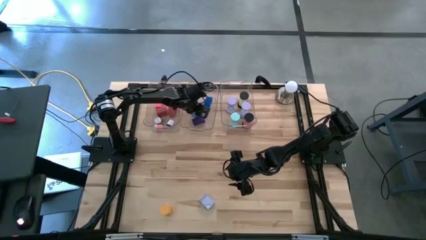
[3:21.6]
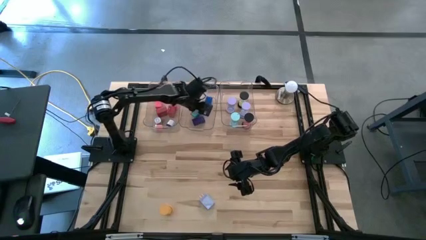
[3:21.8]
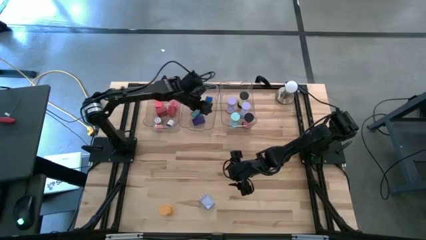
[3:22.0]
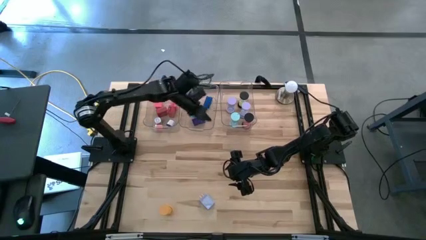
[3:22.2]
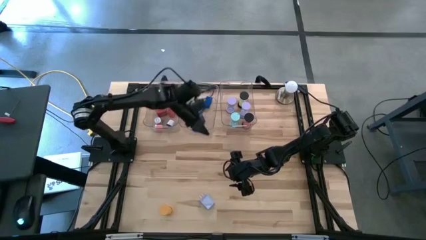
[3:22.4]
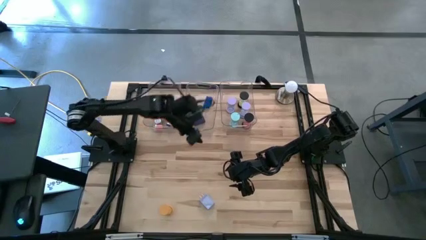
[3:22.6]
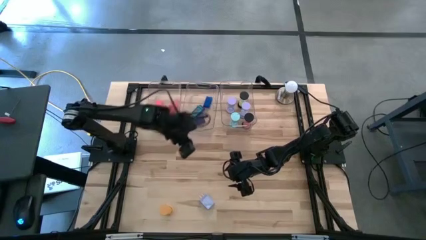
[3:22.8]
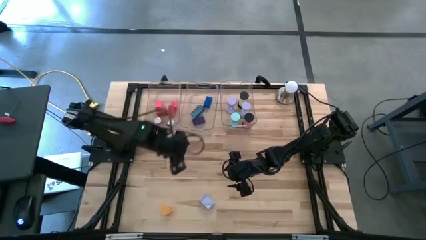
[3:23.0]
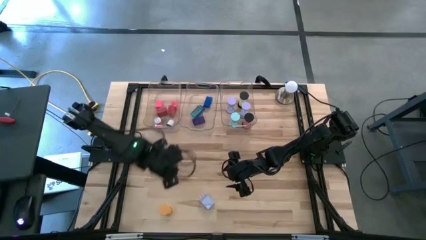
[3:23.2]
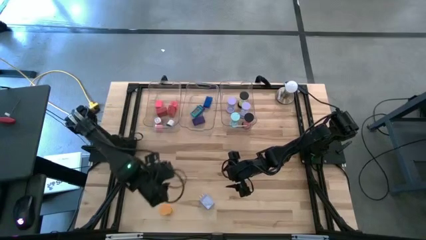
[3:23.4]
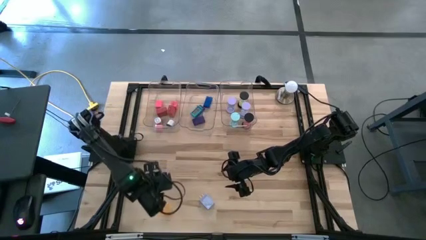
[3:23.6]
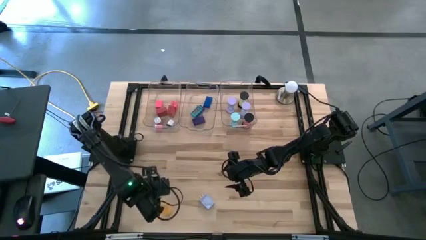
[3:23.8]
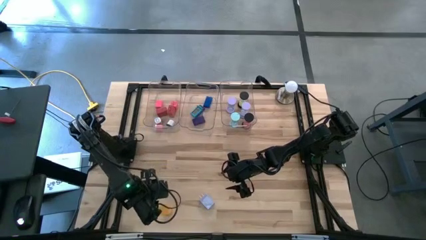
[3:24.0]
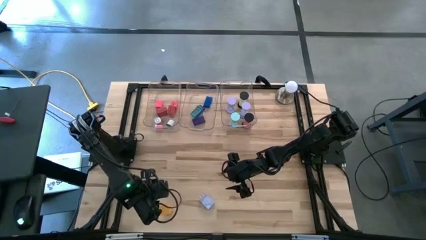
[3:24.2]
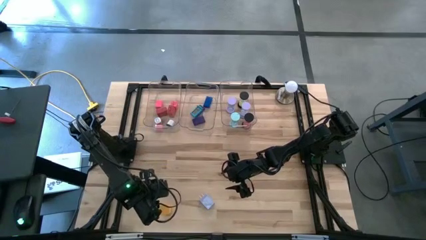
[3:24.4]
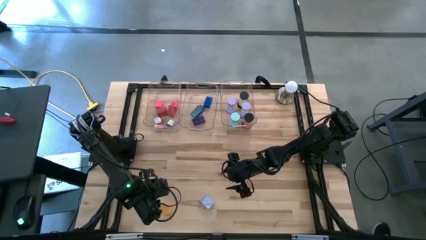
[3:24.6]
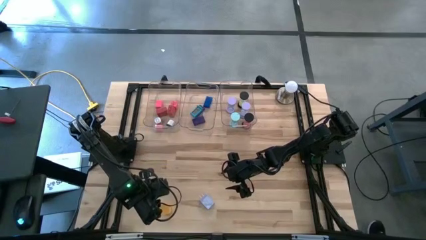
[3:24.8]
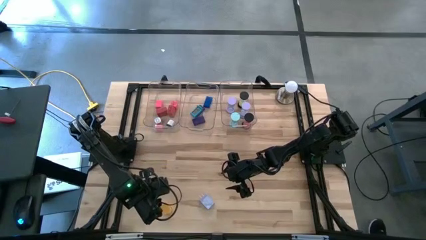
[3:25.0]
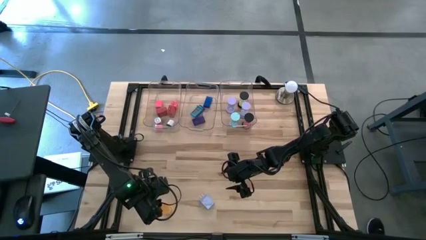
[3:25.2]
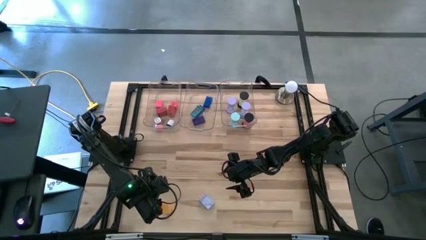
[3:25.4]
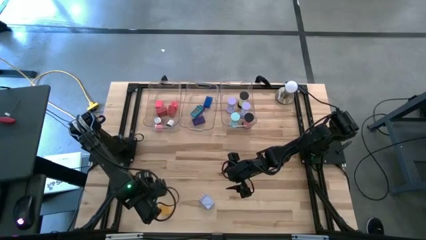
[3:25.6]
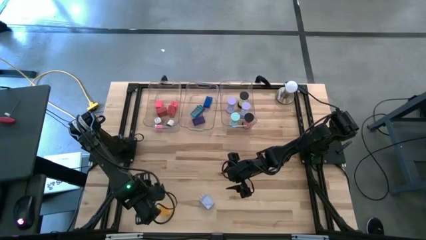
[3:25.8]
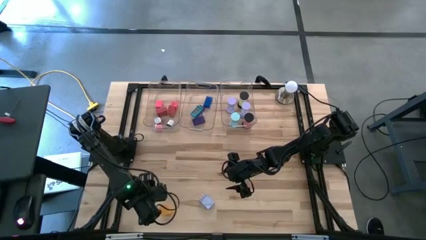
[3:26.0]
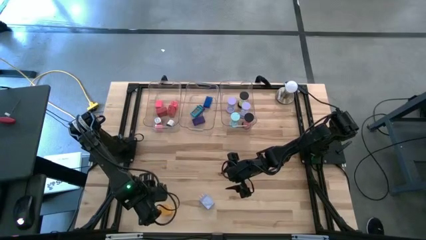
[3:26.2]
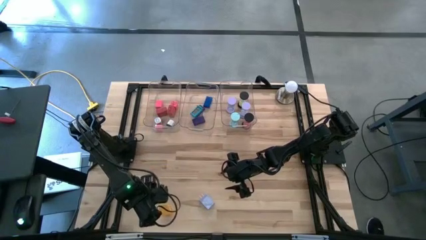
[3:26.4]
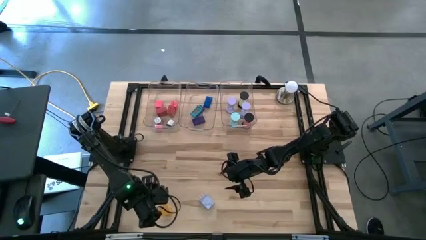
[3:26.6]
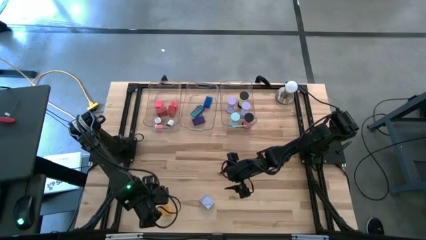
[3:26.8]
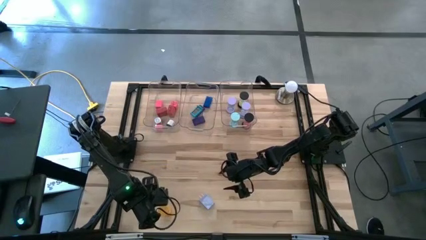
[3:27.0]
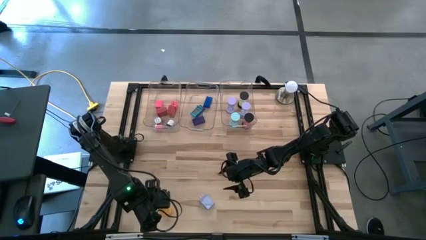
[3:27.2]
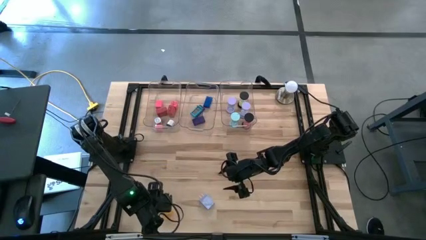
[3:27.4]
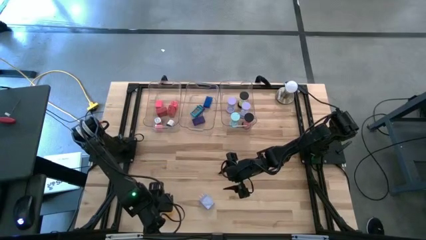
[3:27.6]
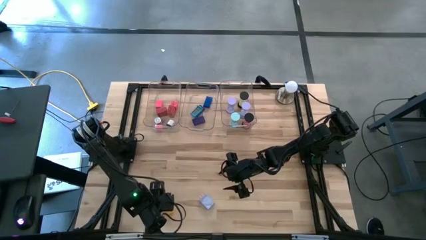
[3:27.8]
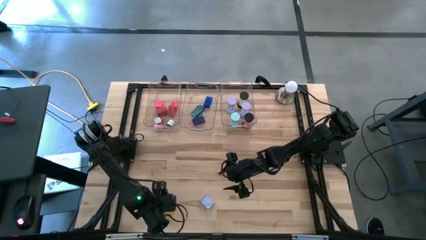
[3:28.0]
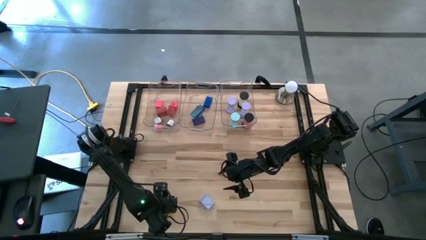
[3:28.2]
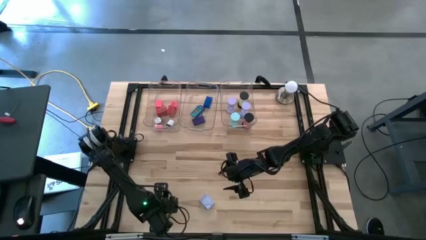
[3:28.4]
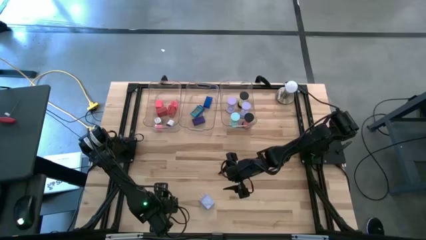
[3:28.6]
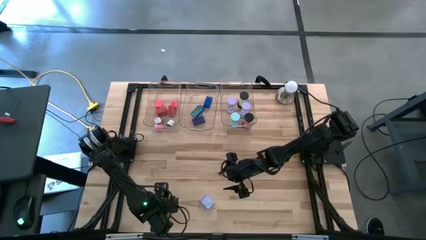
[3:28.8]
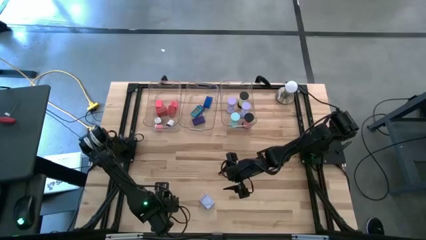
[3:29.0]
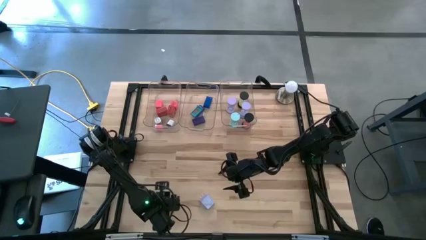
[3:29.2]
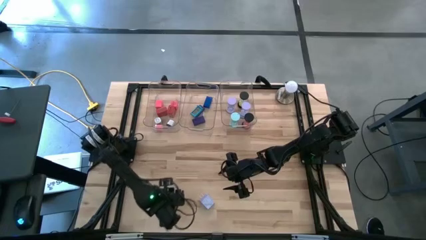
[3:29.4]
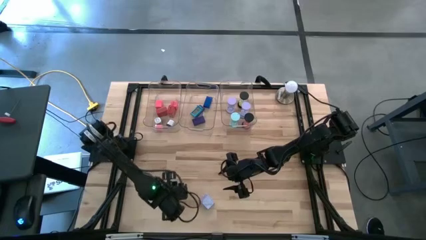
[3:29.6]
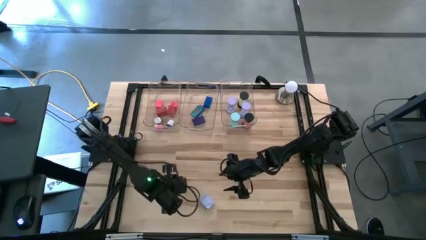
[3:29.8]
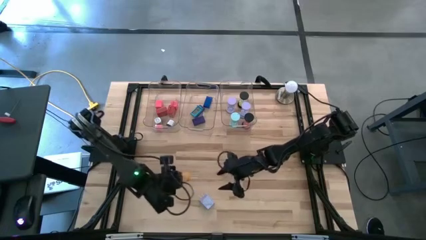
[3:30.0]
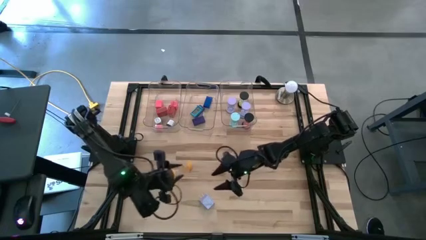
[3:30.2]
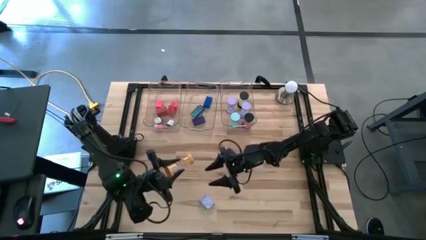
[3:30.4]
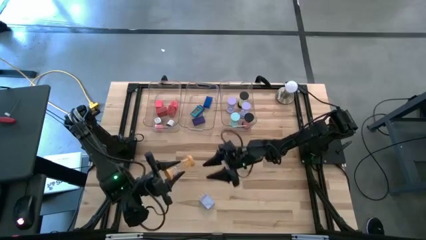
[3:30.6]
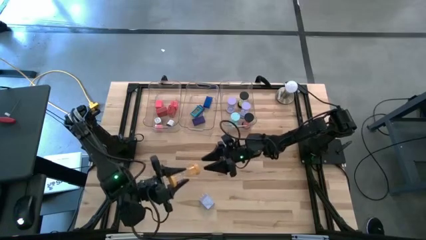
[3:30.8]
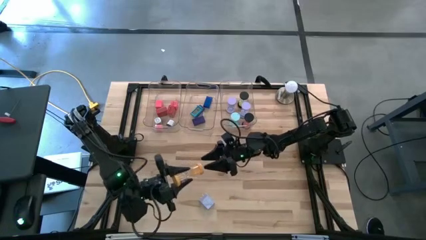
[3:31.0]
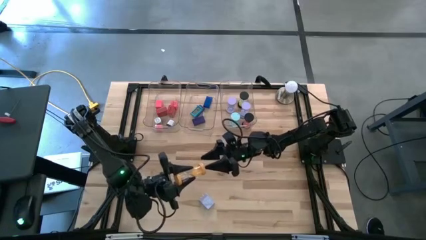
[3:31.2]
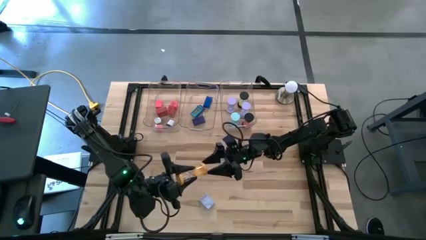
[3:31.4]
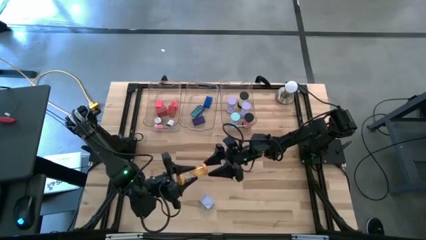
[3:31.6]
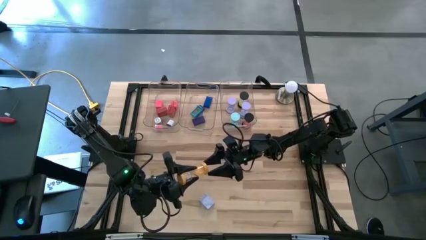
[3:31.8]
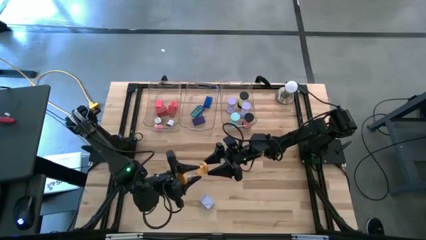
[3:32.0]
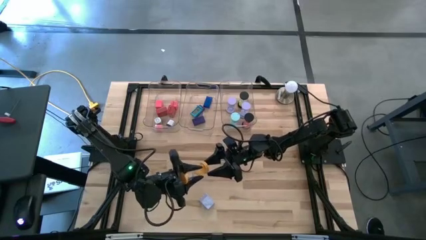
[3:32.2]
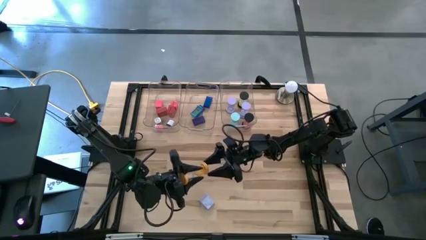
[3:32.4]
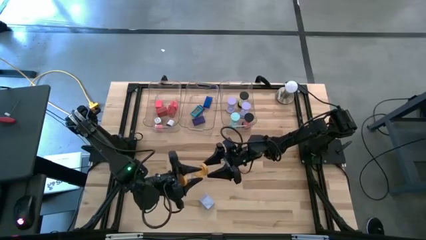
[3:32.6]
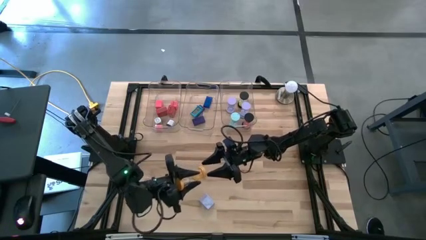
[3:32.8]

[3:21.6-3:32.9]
Task: Pick & Place Office items
Put the yellow hourglass into the right transparent bin

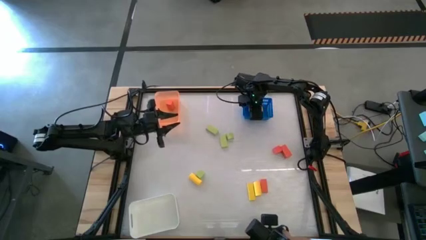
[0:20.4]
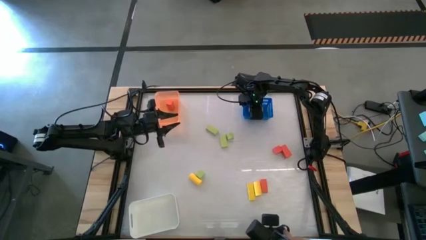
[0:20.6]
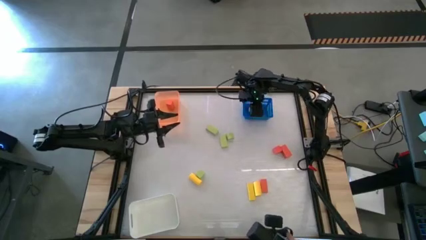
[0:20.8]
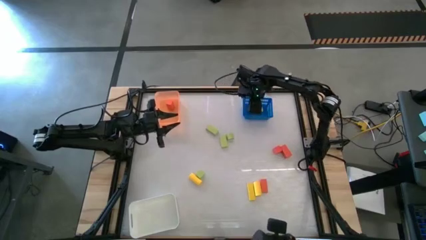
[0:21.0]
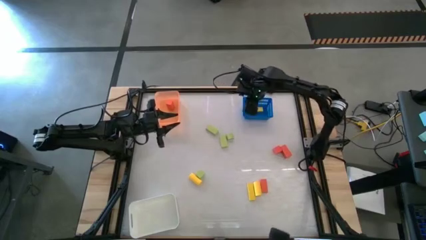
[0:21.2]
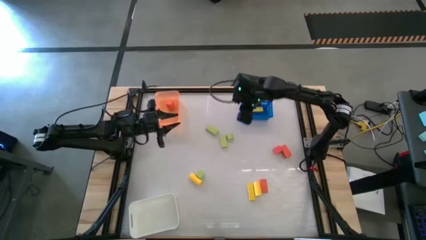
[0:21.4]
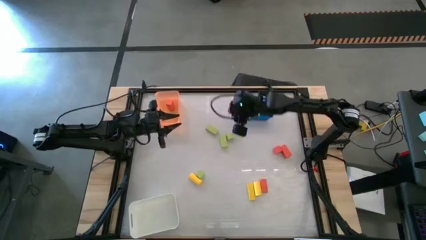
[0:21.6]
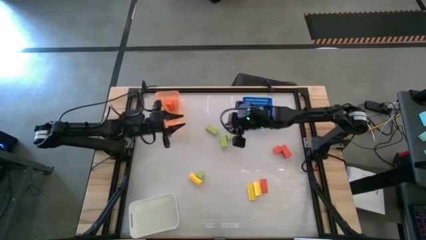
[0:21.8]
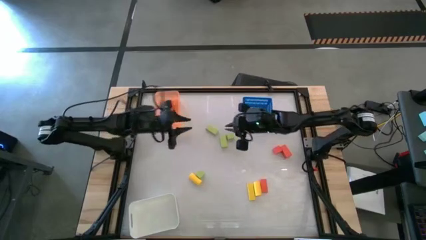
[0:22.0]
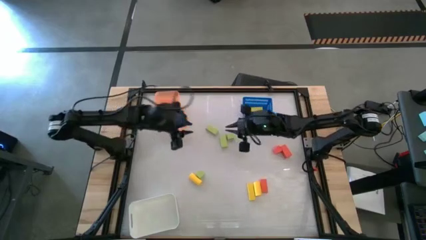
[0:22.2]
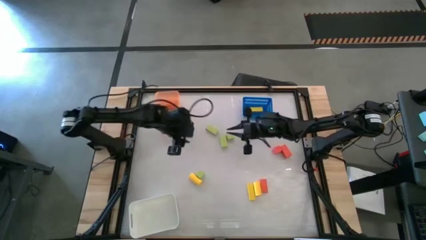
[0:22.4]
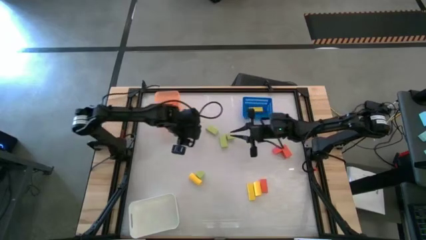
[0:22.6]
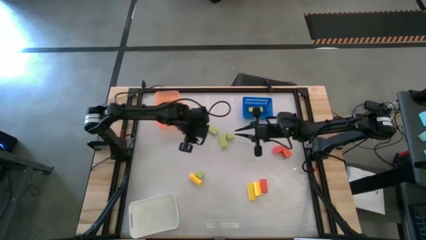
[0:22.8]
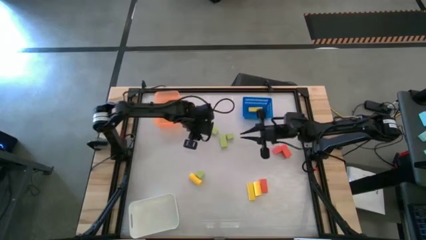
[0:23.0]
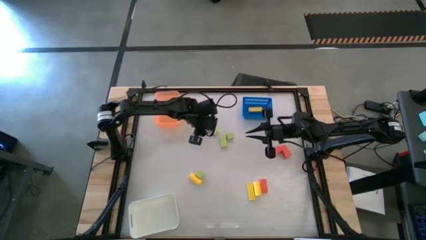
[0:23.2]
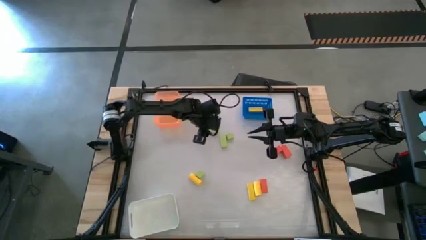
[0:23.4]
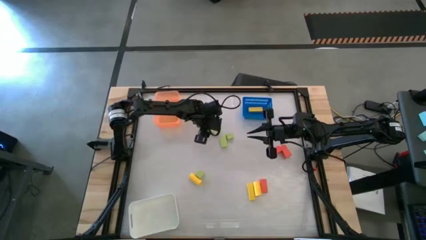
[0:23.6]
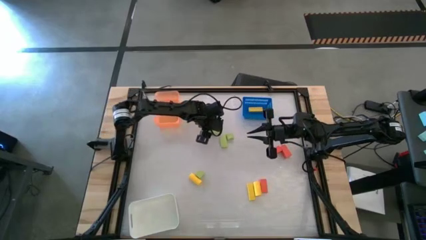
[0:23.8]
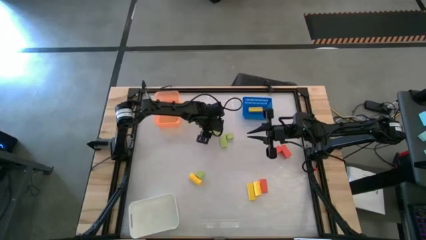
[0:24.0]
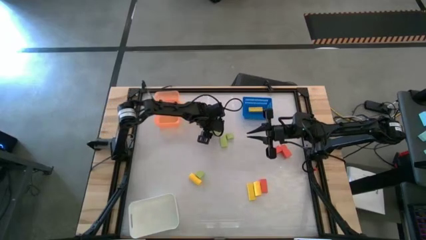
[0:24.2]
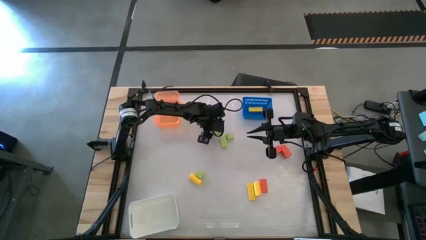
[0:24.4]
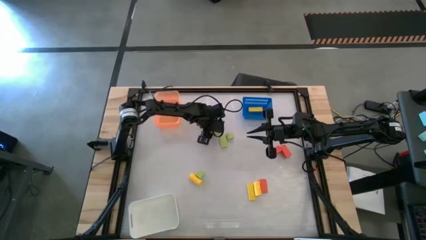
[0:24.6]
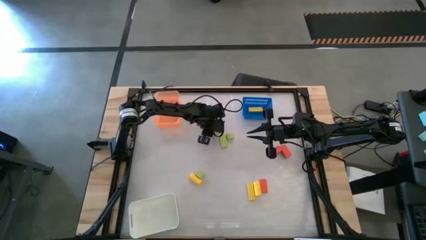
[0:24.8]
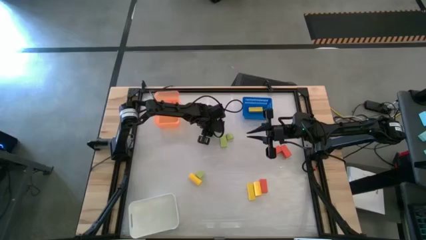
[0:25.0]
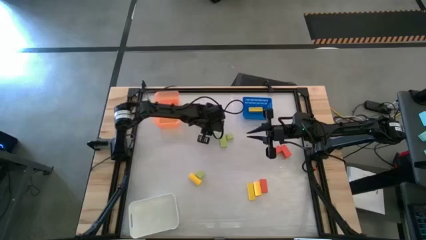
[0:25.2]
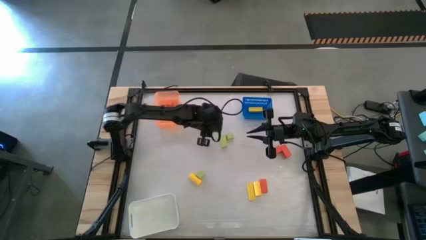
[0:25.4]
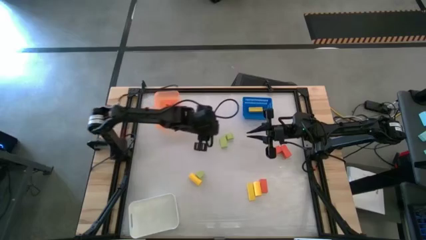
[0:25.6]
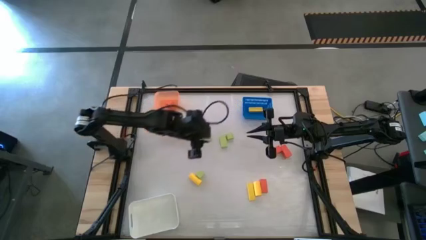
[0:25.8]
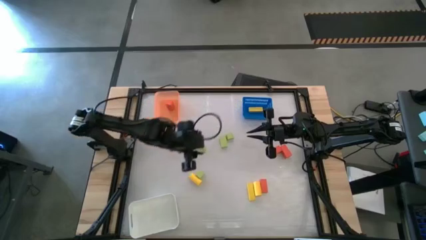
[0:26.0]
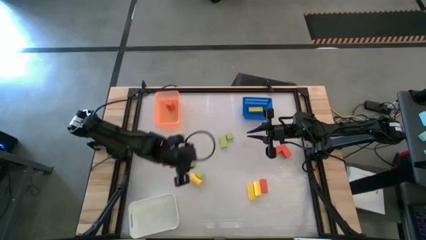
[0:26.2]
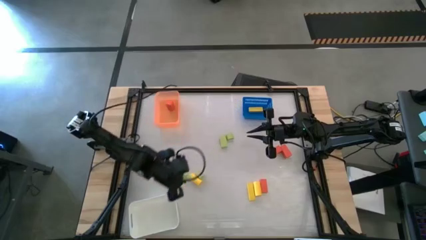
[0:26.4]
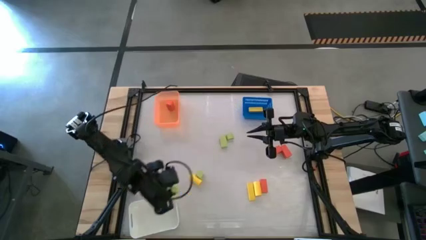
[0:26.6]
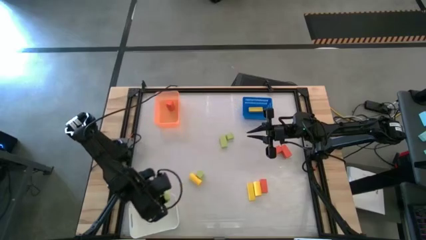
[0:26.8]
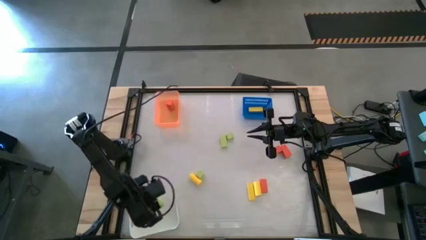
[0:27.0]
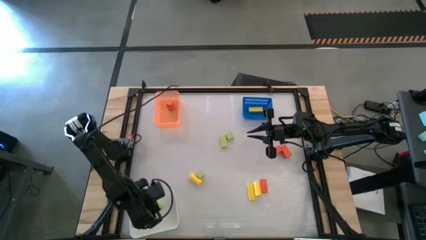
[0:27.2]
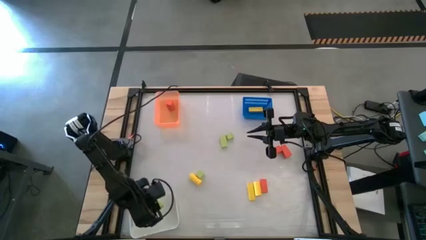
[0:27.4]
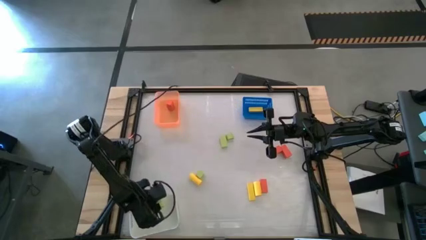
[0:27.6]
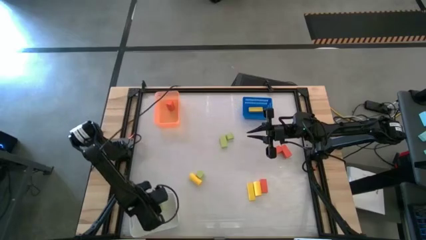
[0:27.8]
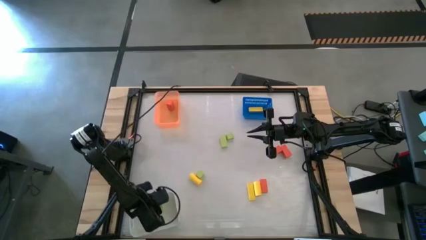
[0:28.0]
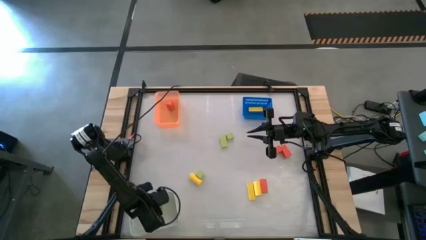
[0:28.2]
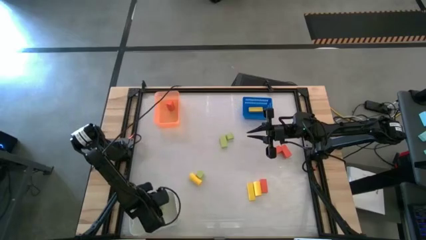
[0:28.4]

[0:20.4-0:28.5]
Task: Sort & place blocks by color
Put the green wooden block into the white bin
